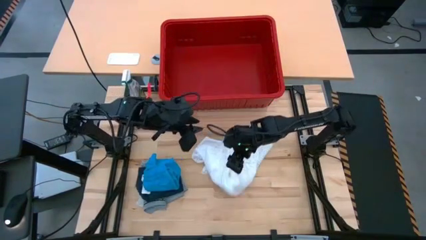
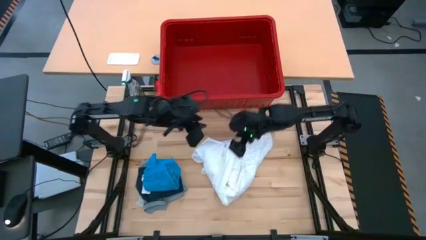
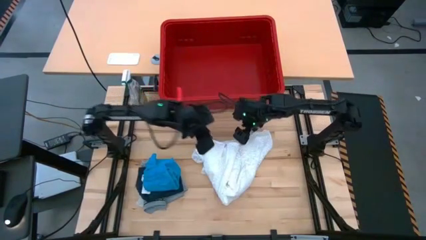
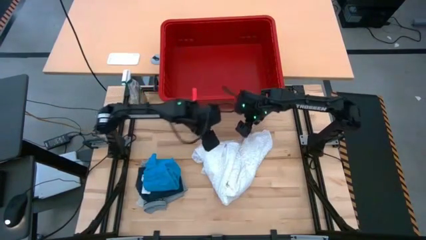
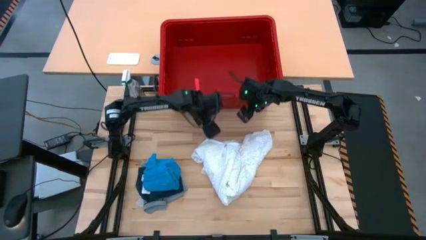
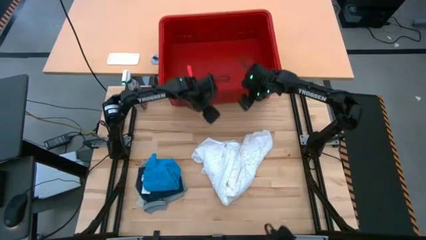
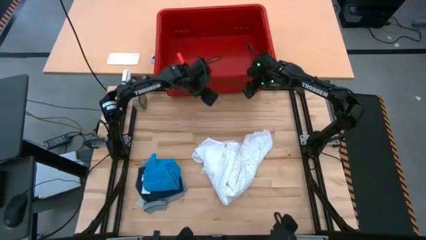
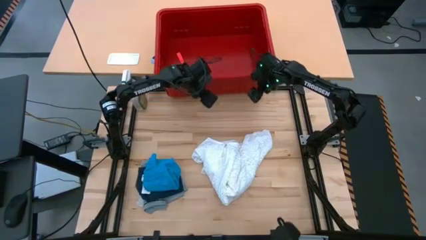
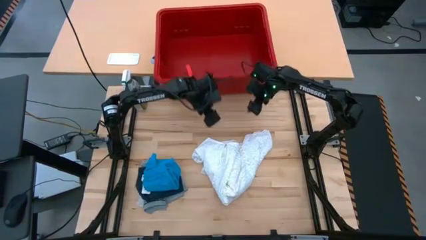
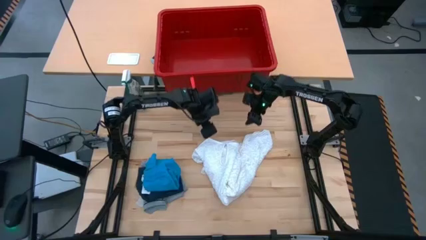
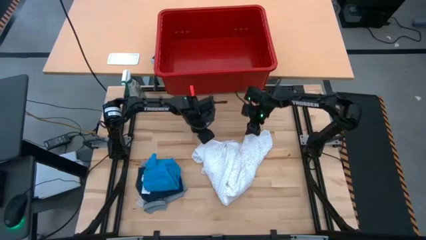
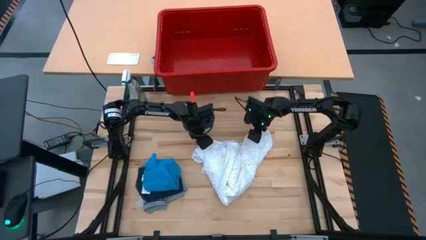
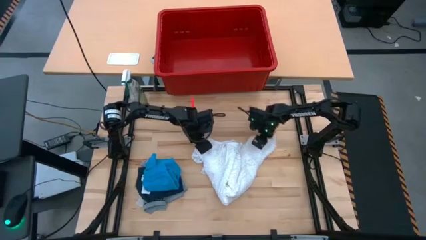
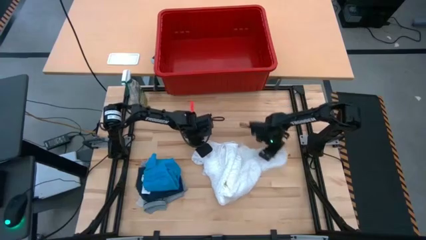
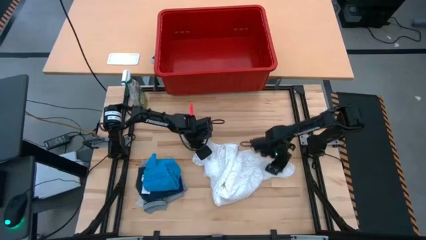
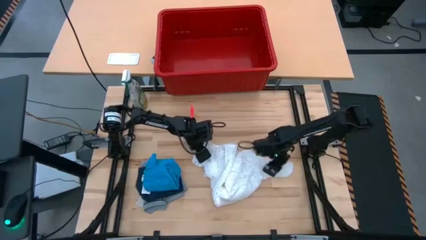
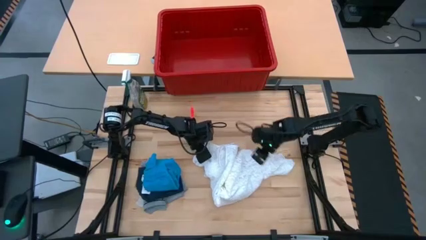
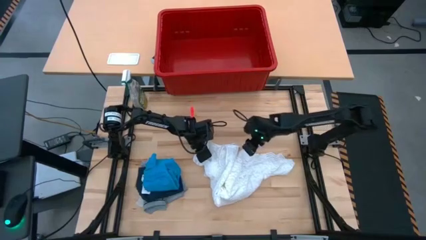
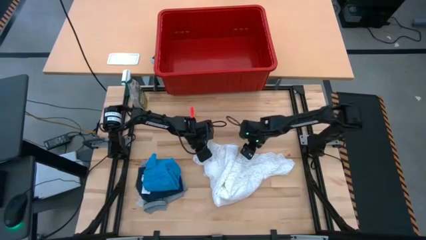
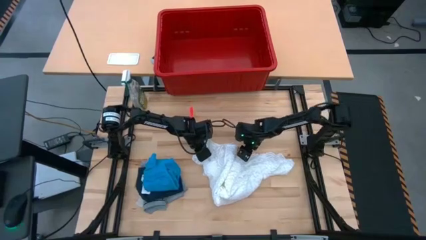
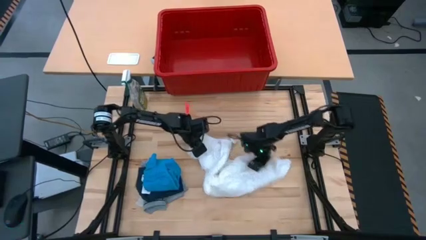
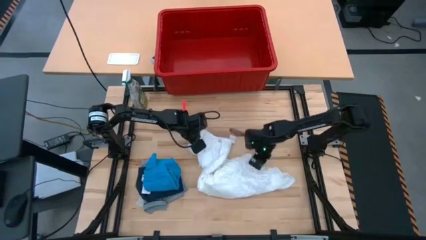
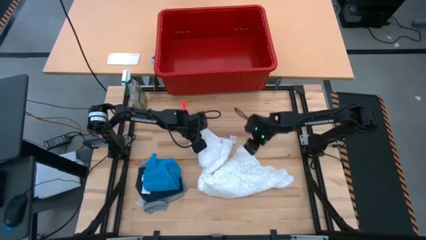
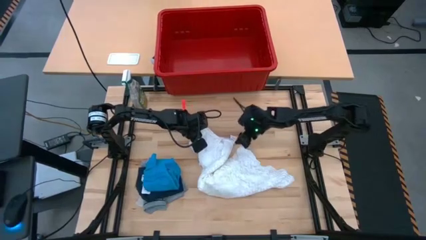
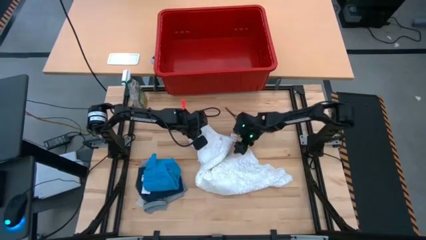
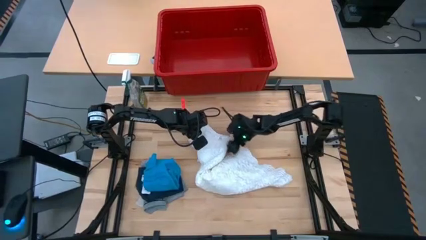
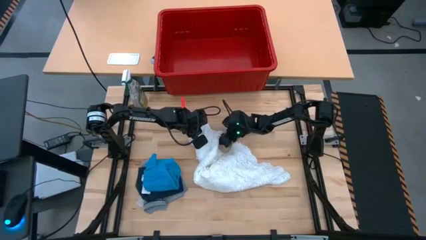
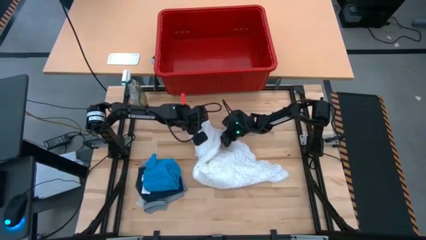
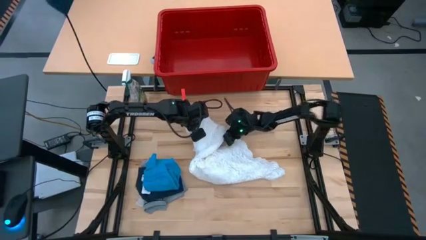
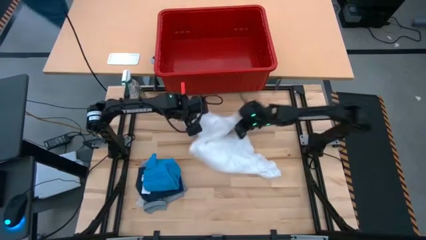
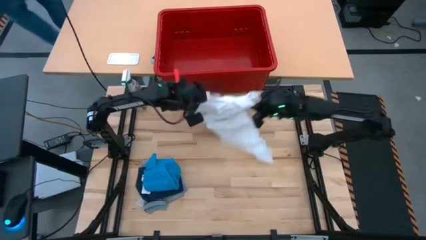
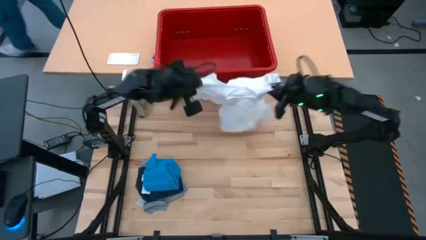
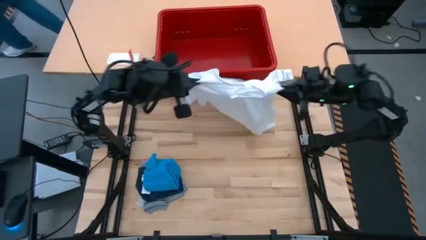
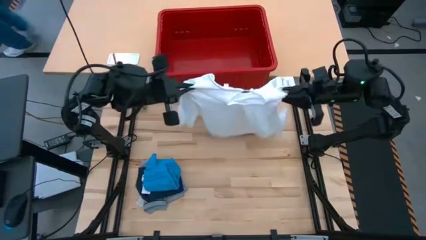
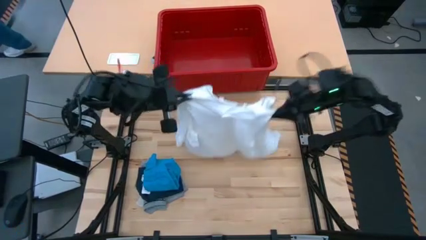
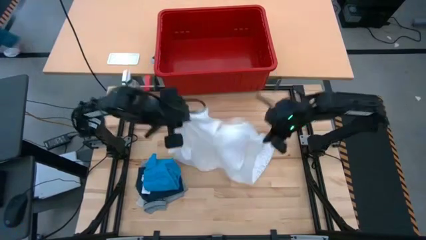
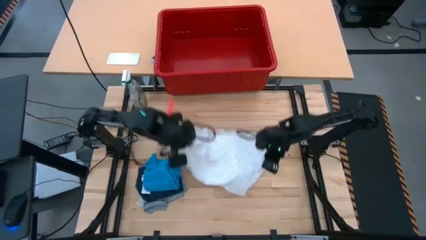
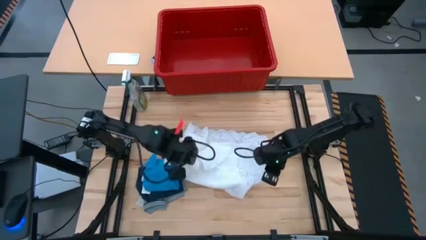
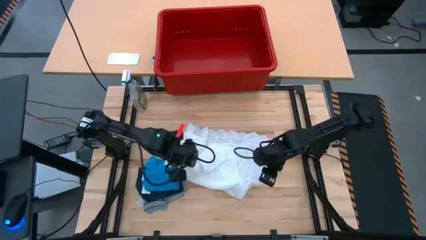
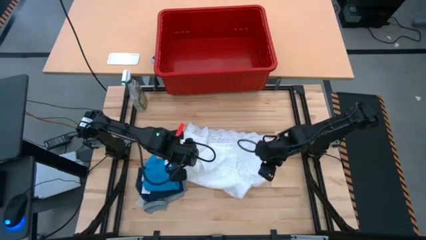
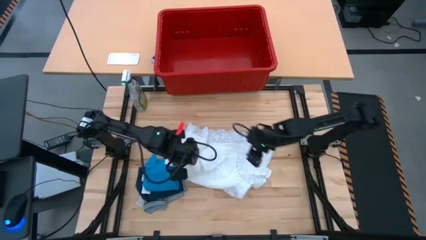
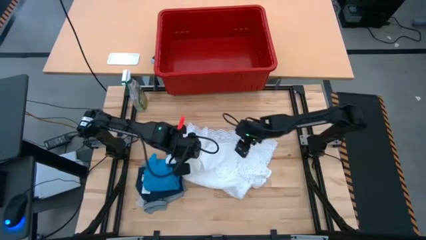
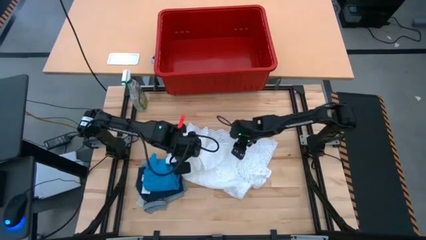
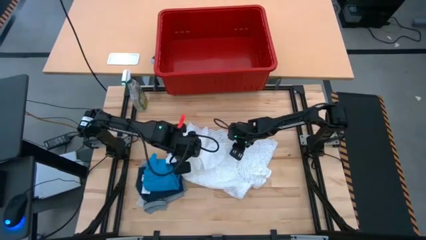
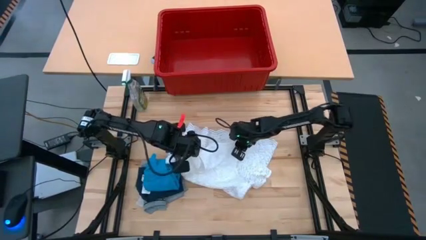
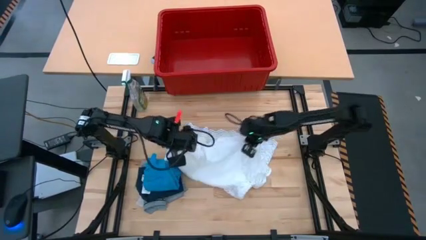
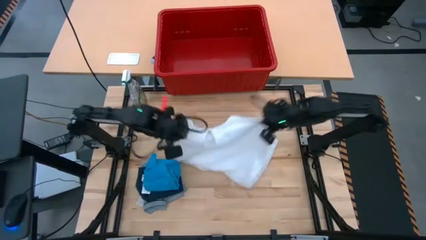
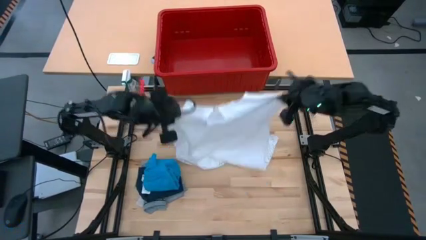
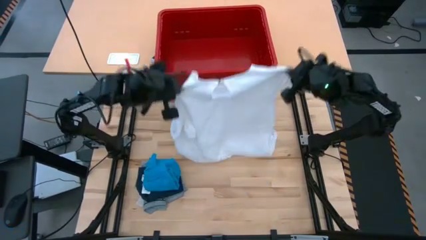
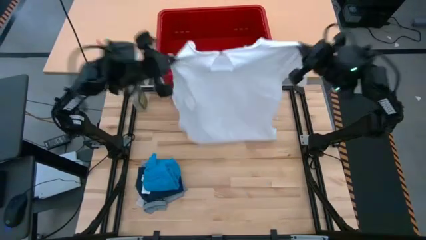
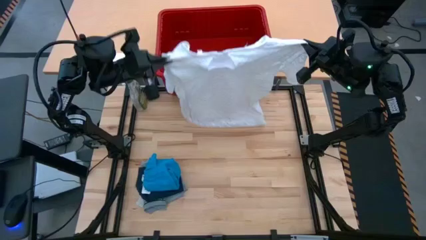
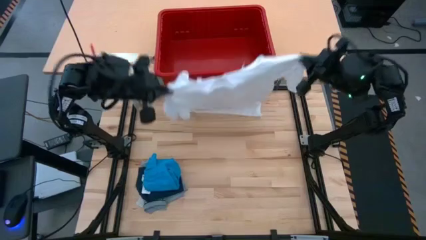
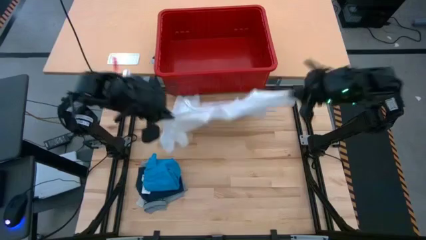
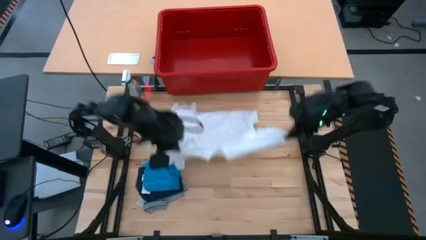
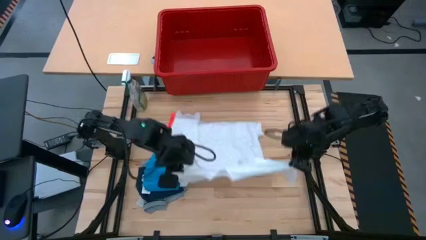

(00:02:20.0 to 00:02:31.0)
Task: Fold laundry
Fold the white blouse

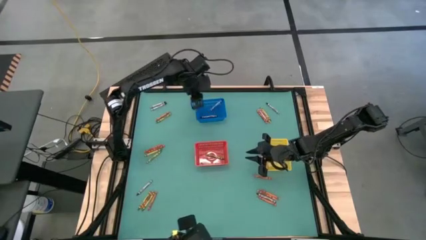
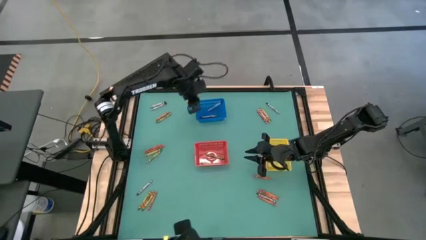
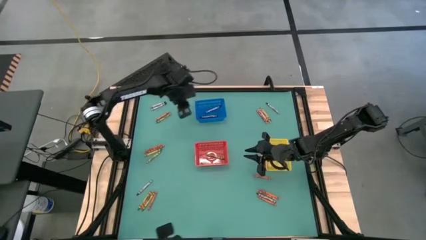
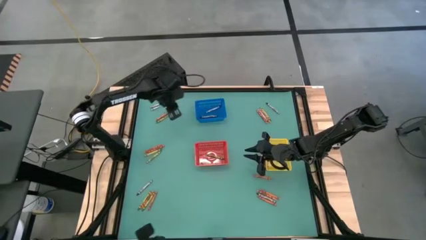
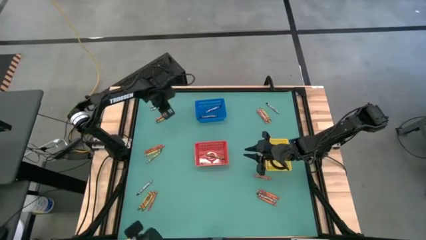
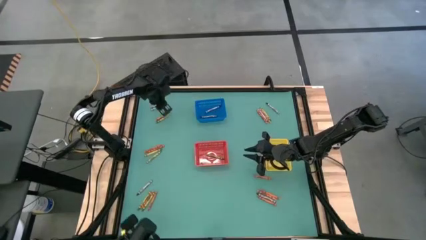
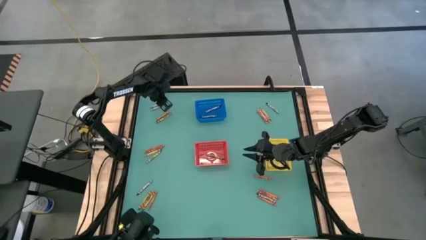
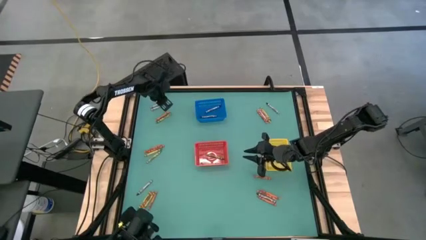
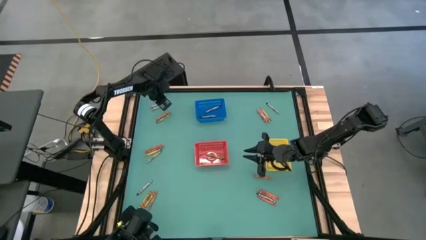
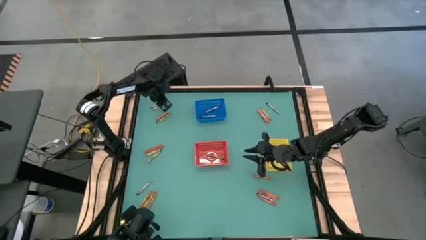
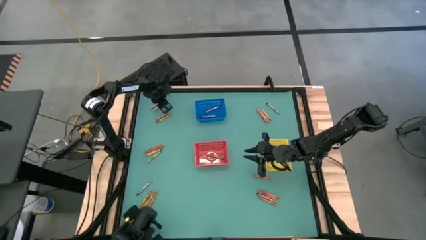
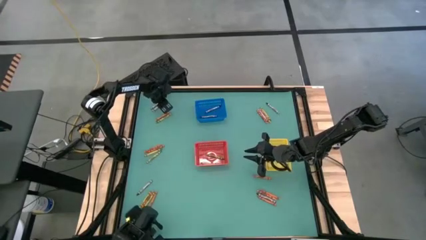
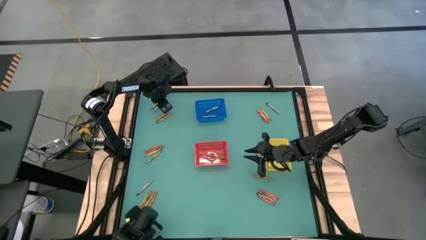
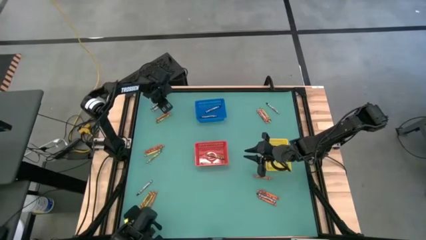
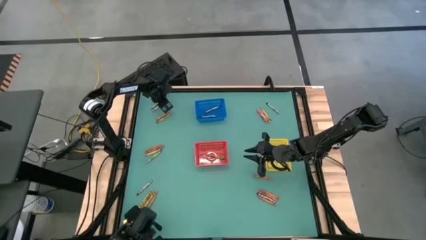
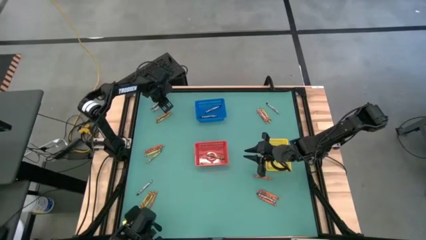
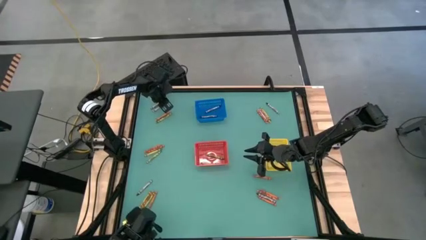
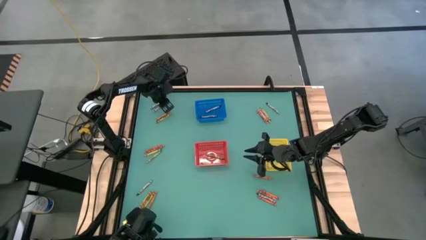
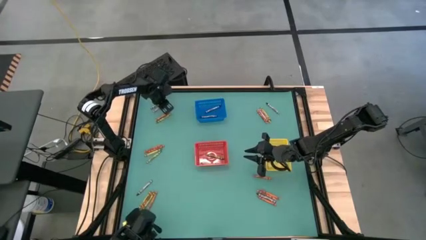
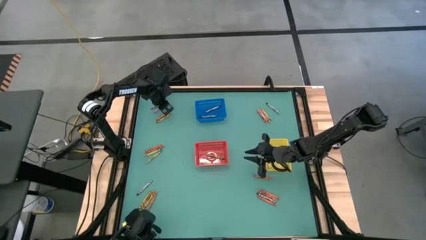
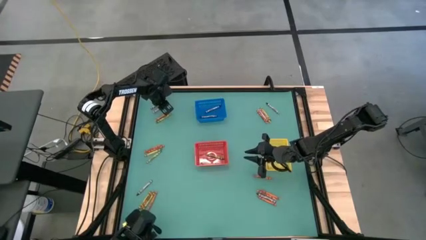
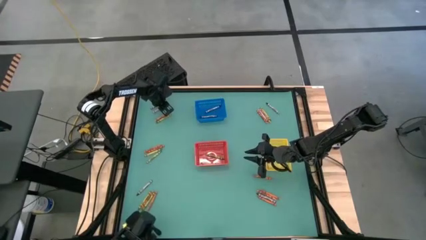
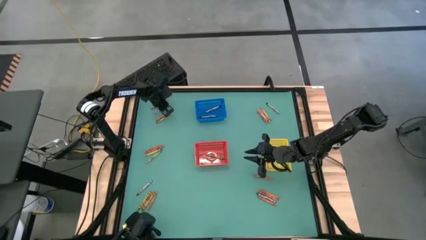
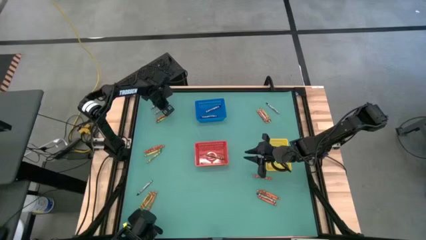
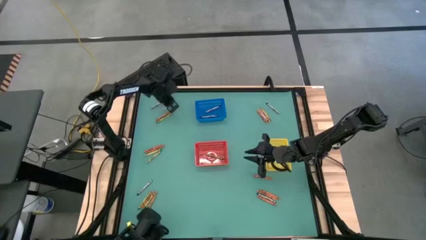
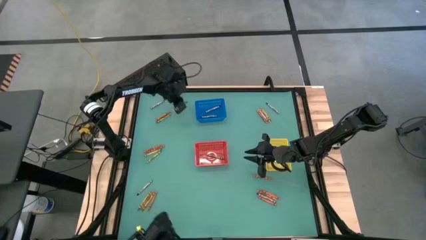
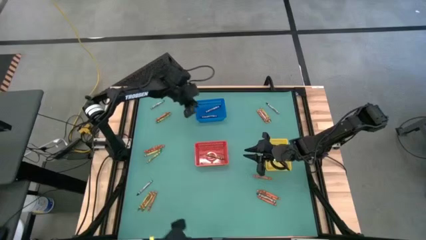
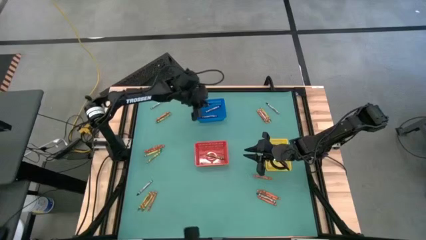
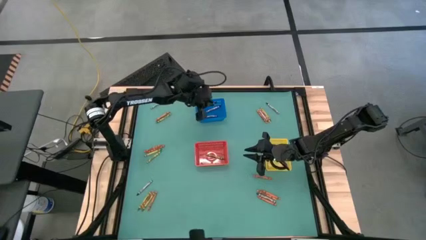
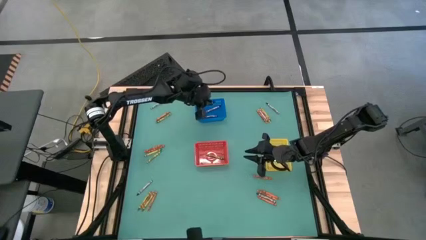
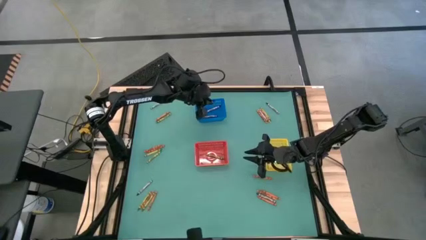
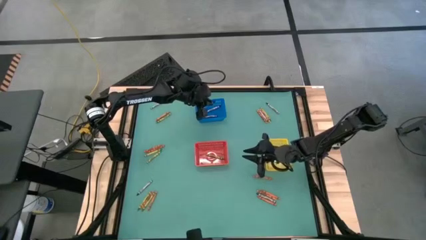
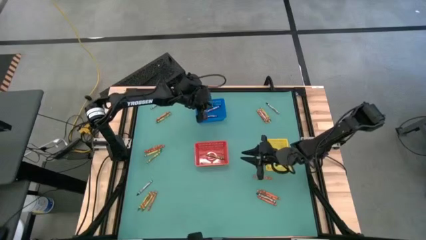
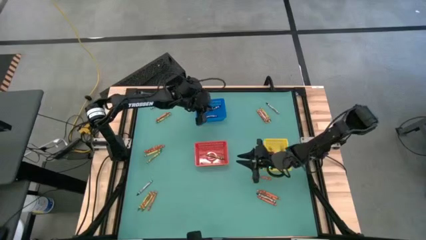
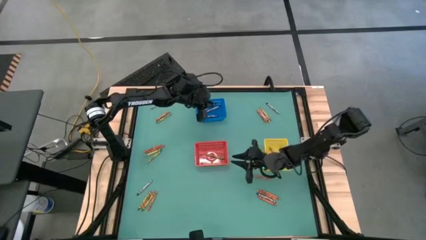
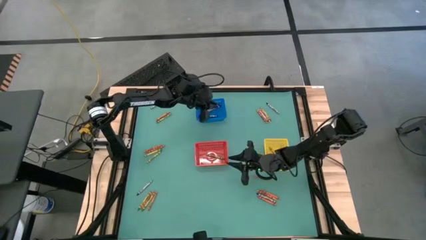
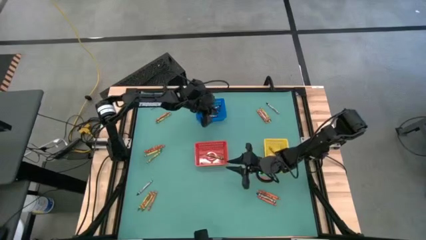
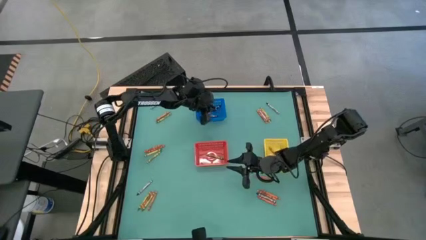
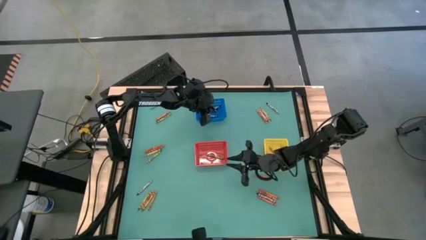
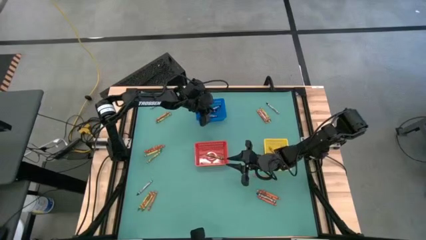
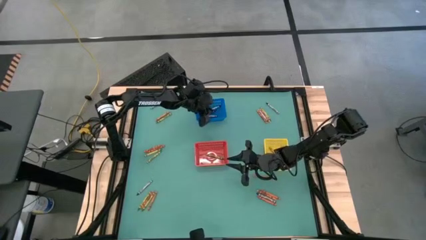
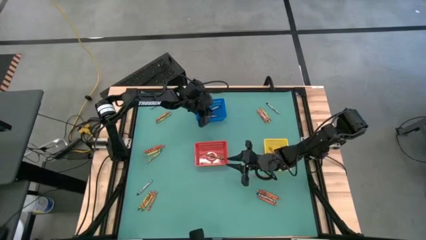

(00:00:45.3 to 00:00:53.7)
Task: Sort crayons
Put the black crayon into the blue bin
